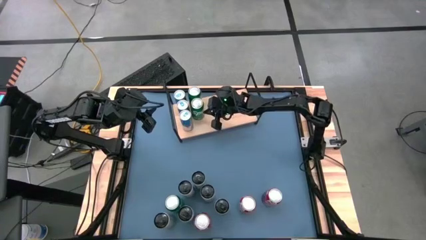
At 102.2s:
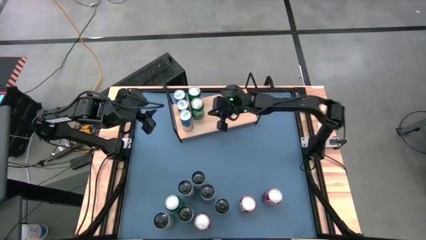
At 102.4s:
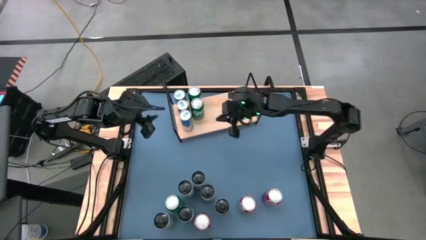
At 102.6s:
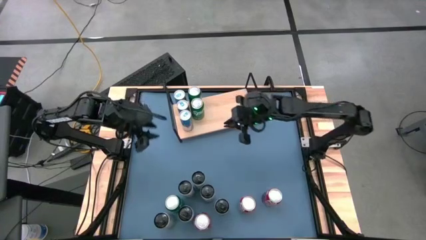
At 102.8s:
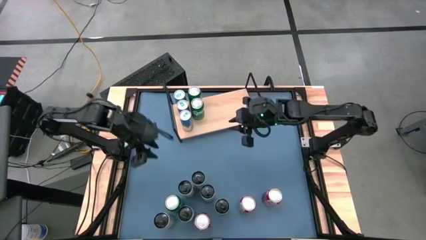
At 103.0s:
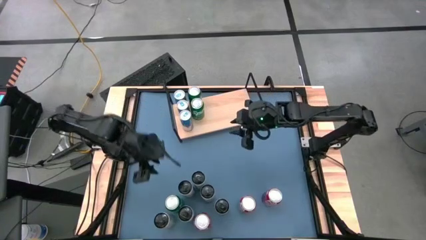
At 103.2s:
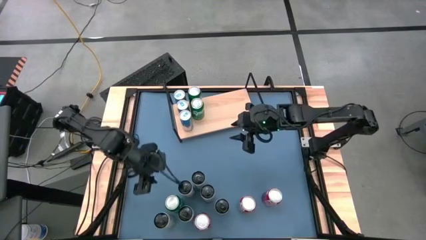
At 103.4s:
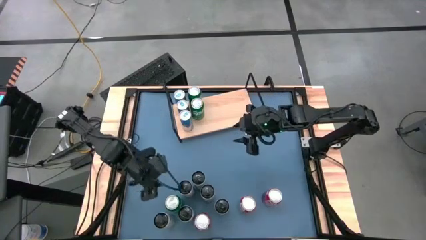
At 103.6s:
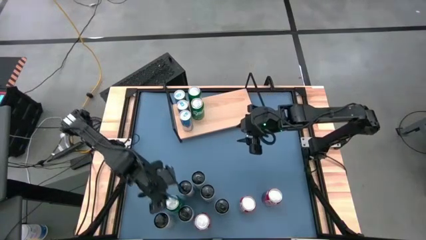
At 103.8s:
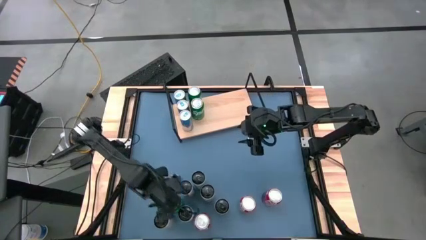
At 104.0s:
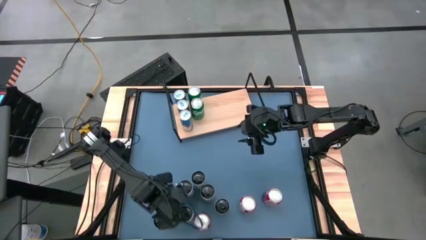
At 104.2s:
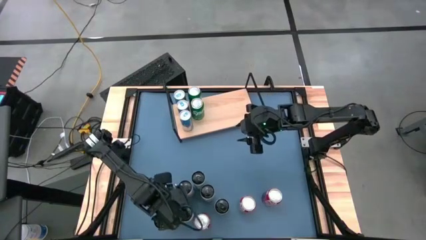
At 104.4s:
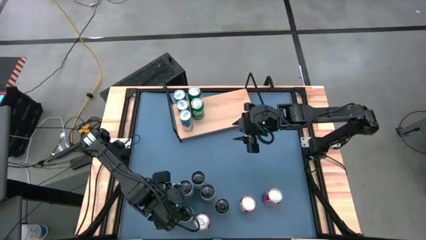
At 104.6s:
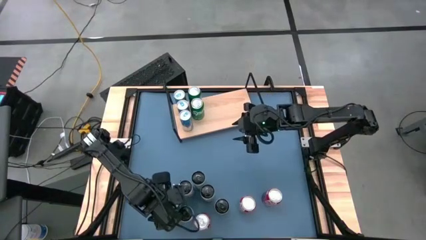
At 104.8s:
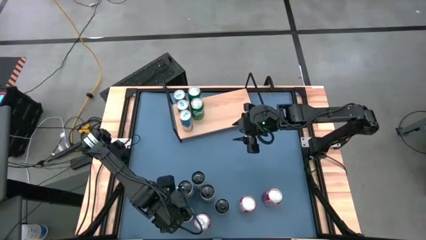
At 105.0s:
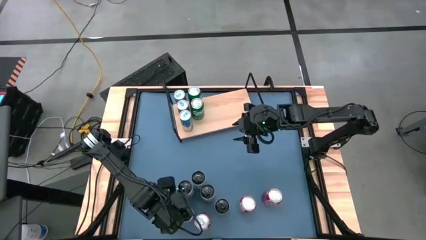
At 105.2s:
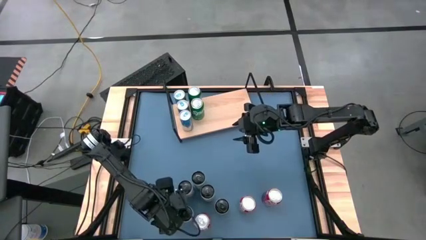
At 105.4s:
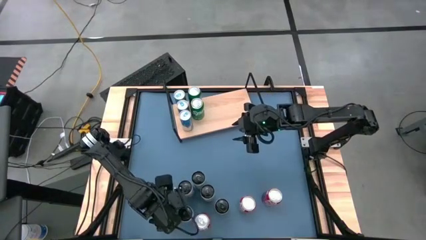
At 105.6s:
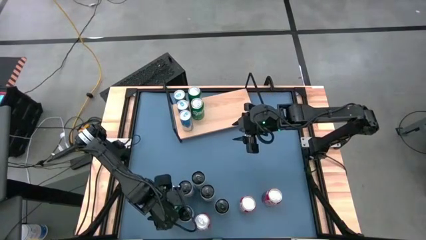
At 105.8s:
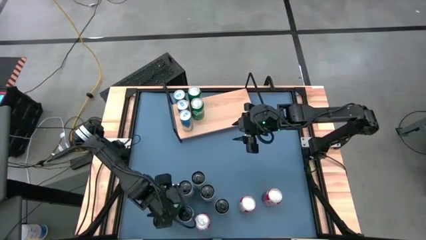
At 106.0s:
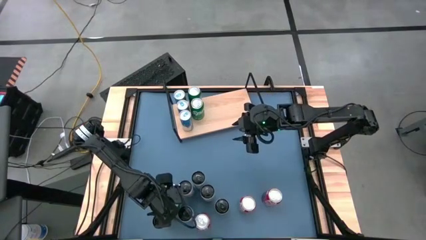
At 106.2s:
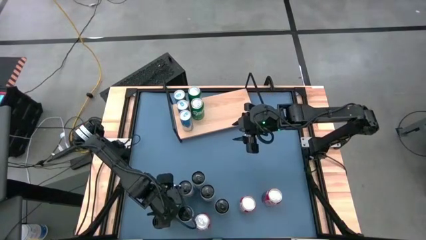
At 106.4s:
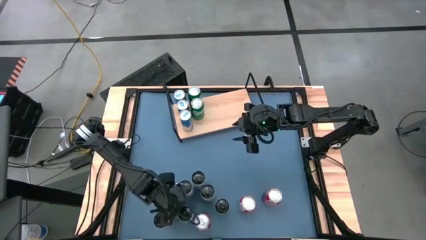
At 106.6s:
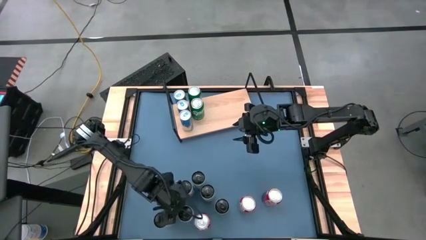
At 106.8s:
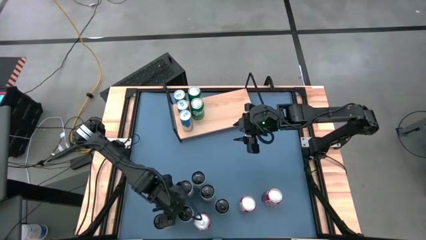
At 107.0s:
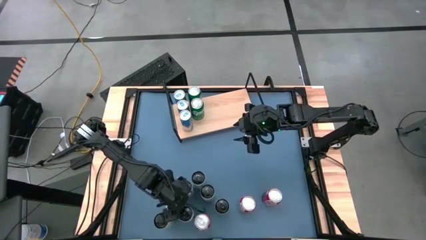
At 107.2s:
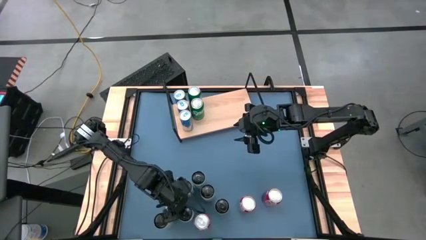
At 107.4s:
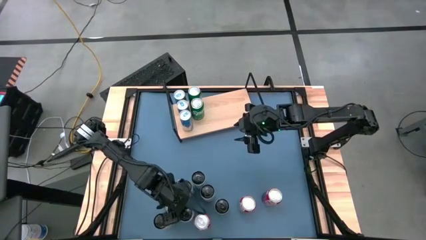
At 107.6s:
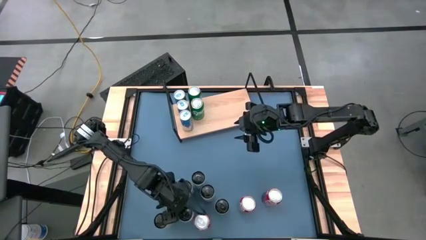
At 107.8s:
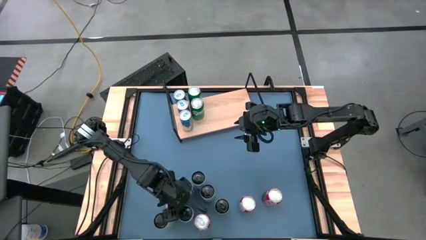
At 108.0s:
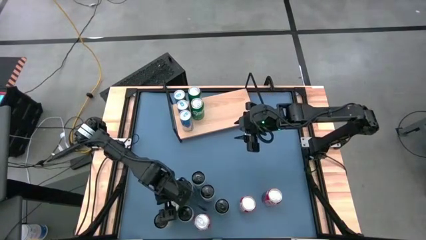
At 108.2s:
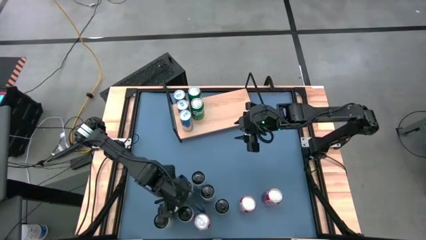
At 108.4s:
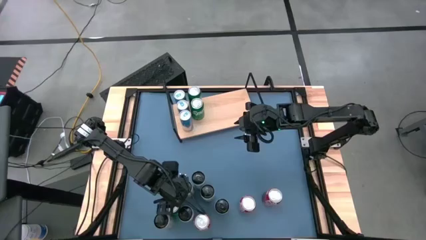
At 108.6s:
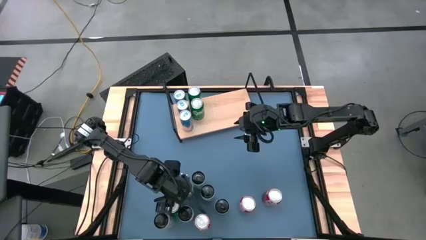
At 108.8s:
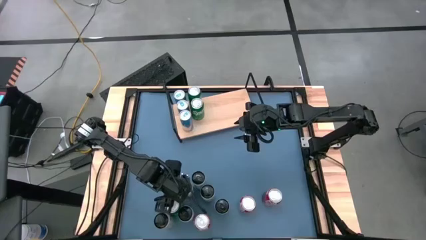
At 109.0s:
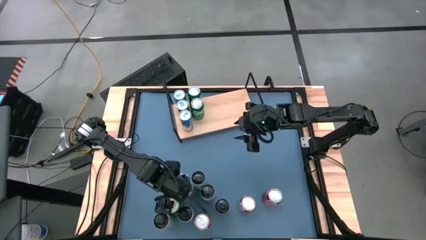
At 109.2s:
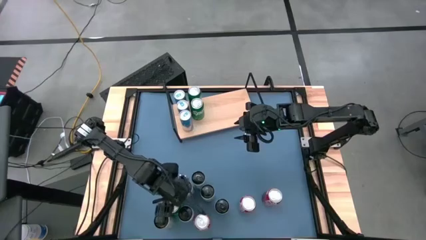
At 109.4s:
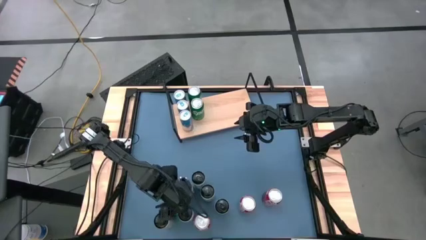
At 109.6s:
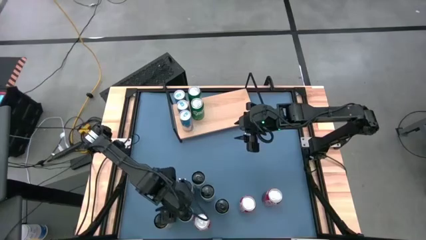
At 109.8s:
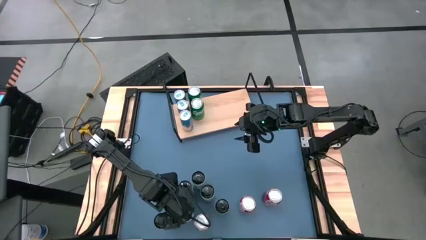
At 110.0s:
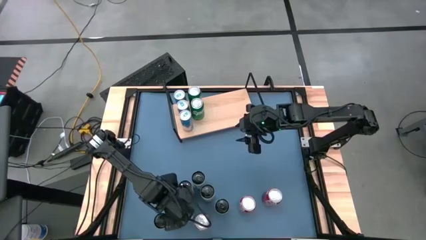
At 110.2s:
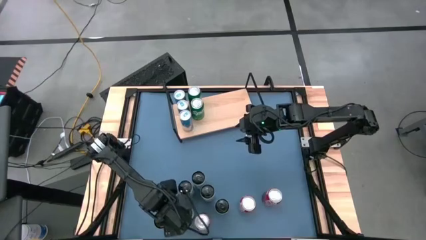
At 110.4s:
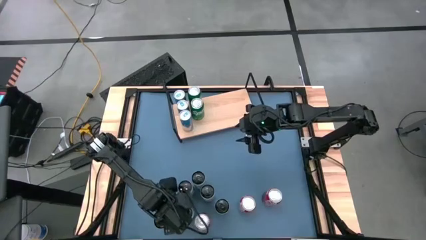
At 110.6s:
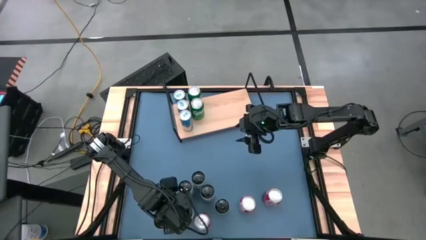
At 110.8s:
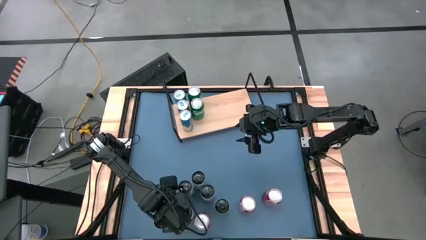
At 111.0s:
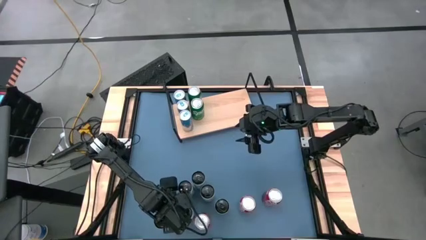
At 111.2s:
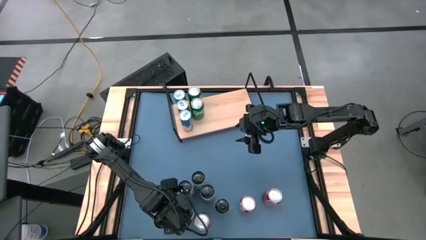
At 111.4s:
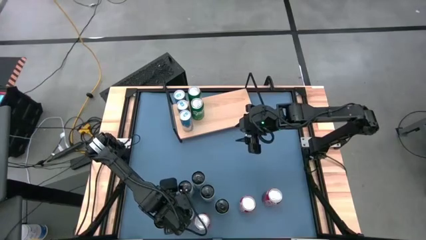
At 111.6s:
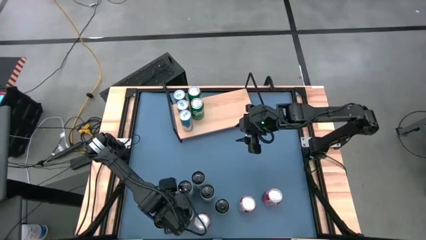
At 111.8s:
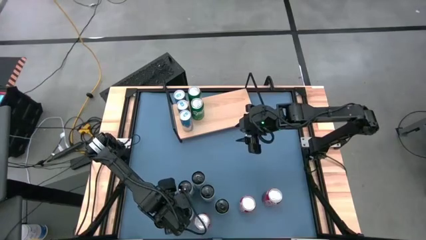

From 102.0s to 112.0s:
Task: Place canned beverage on shelf
Put the green soda can on the shelf aligned with the other green soda cans

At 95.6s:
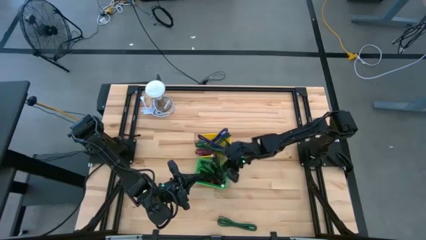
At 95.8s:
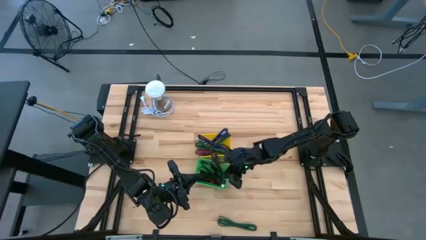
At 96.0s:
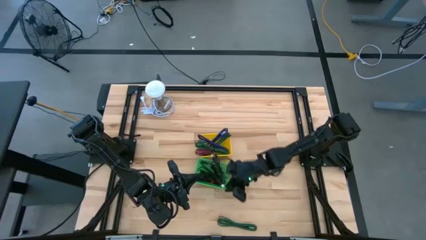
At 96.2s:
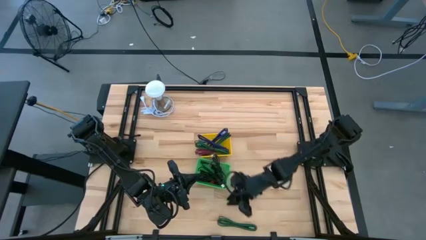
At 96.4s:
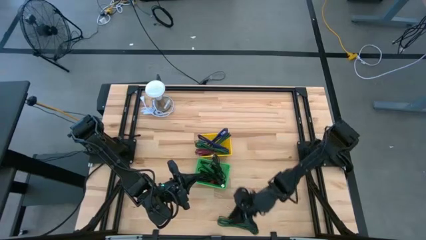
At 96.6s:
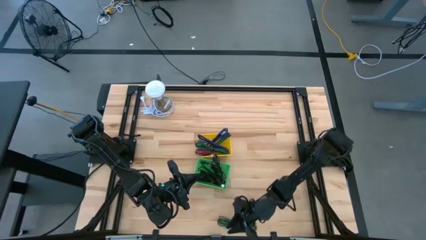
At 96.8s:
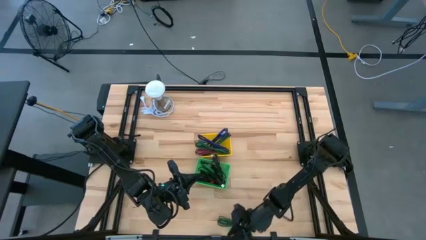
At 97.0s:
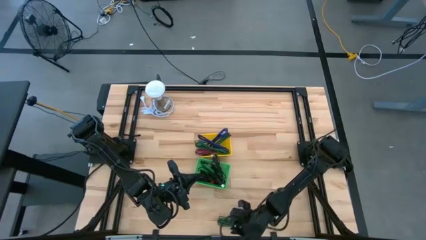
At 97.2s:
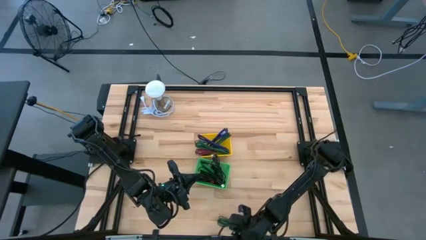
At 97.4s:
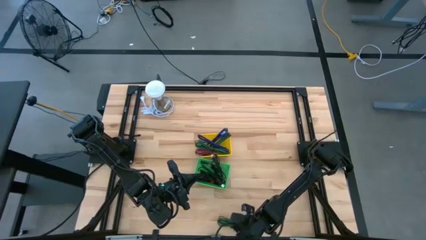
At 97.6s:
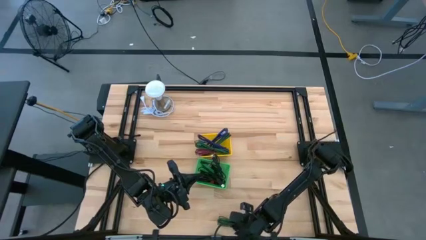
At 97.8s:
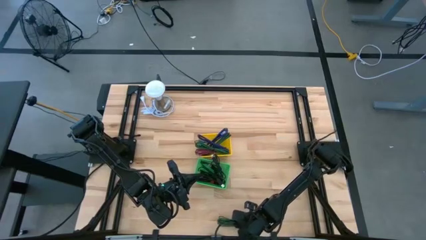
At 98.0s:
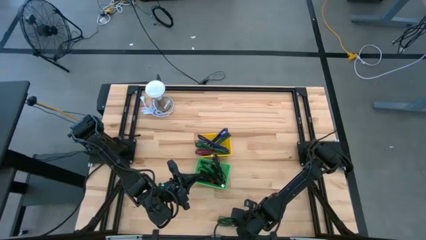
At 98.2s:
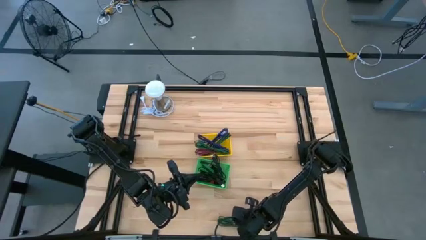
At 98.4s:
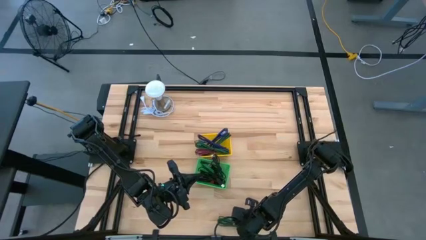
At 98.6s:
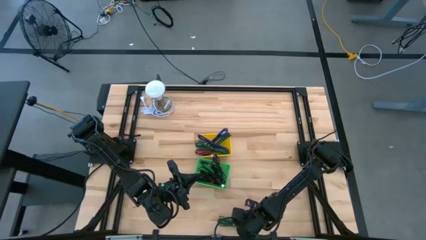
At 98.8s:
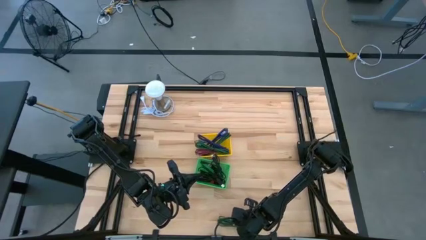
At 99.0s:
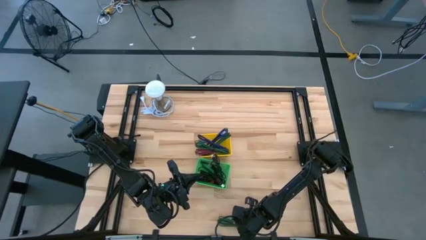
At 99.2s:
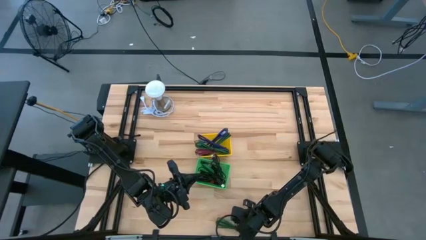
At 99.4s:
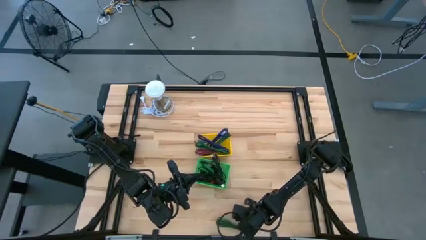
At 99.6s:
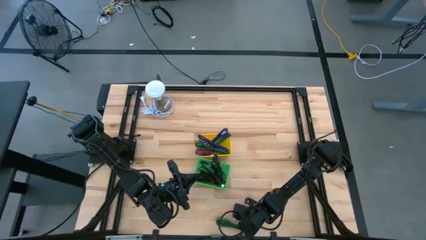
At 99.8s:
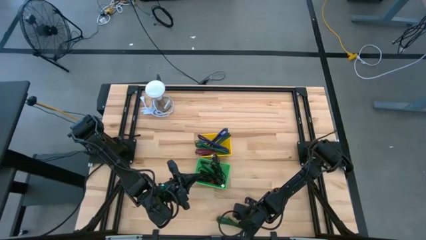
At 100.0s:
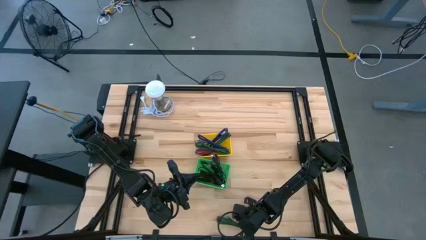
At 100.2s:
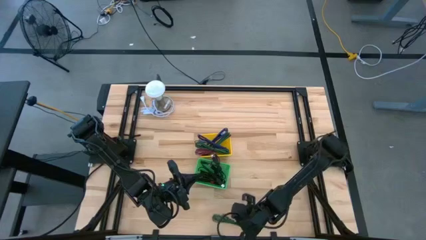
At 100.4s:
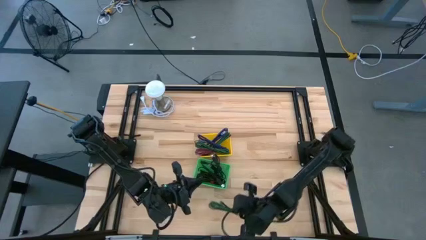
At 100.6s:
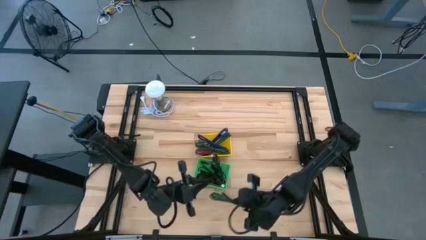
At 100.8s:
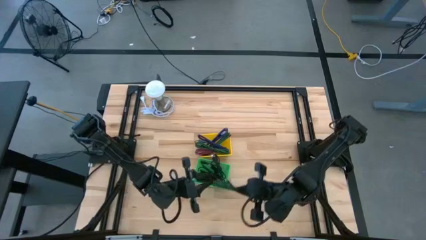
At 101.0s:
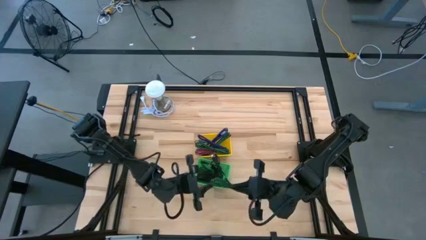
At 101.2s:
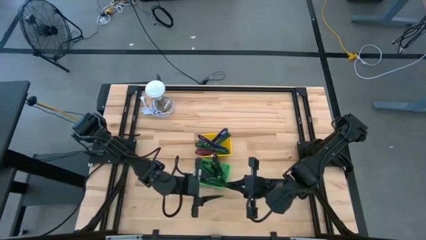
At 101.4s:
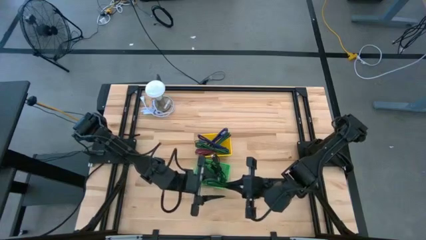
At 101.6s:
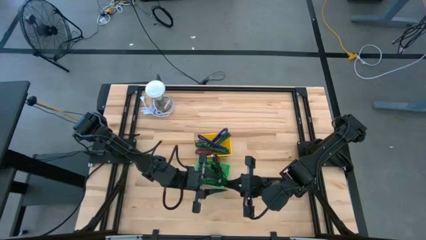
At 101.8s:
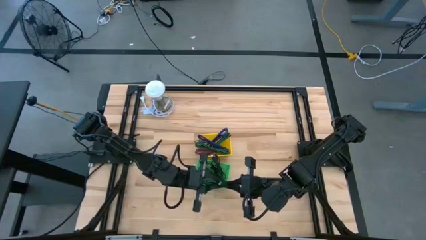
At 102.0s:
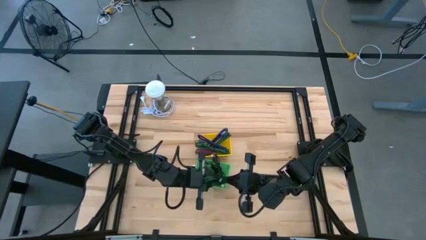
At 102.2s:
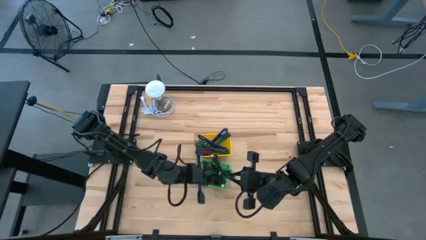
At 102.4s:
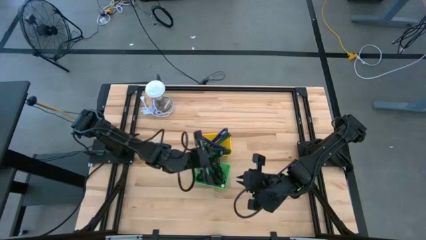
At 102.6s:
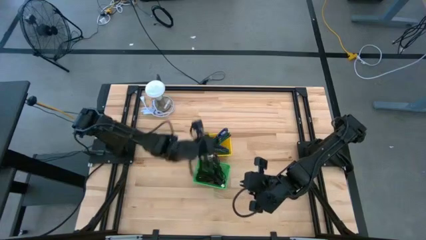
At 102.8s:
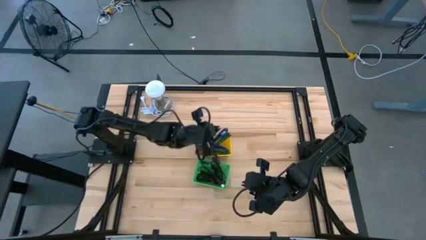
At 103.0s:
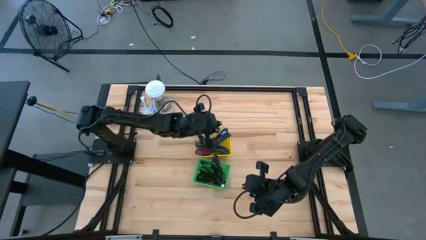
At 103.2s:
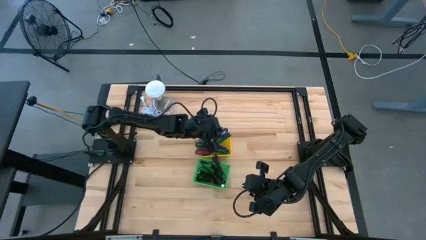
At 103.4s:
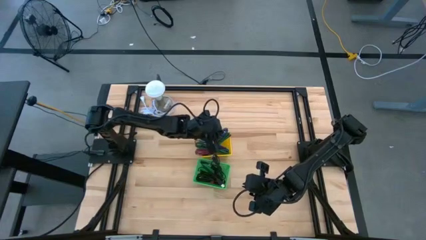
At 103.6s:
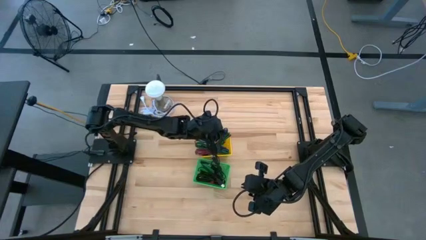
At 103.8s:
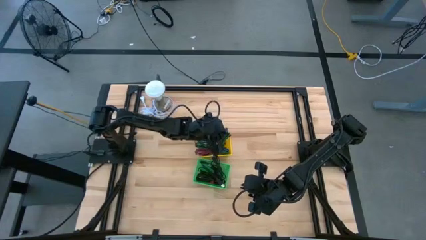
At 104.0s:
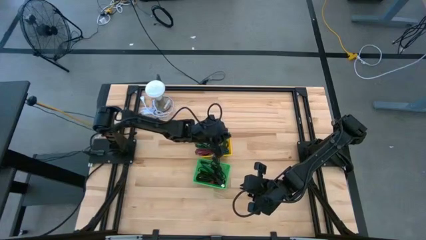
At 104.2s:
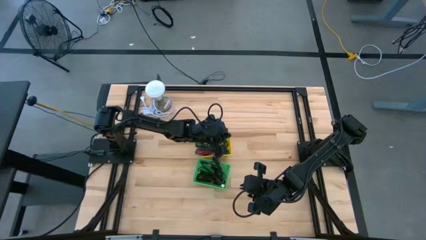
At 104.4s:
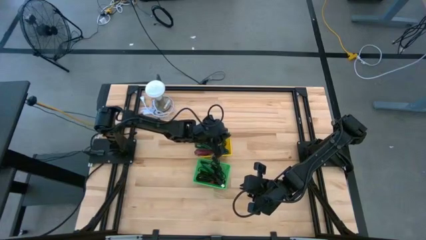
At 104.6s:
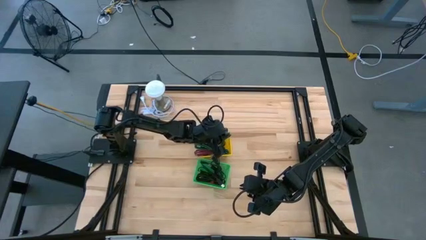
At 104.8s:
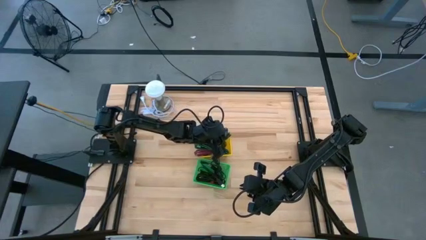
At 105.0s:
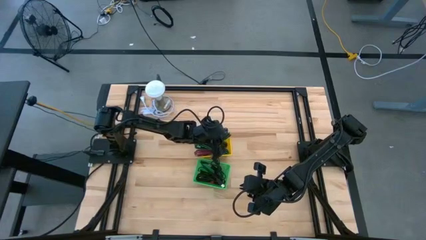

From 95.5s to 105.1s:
Task: Pick & Place USB Port
Put the green and black USB cable into the yellow bin
